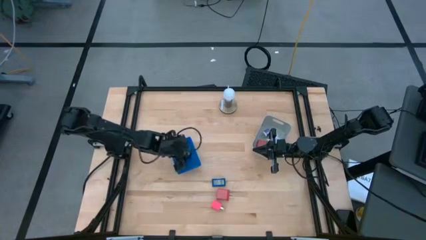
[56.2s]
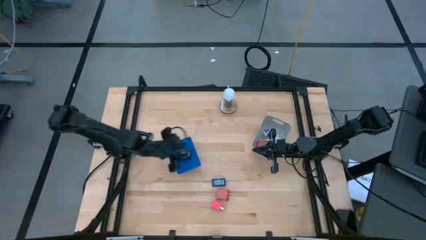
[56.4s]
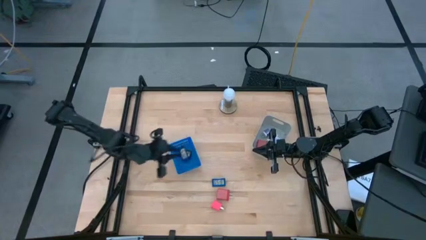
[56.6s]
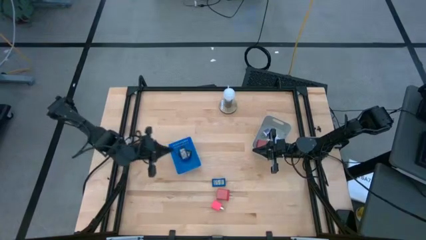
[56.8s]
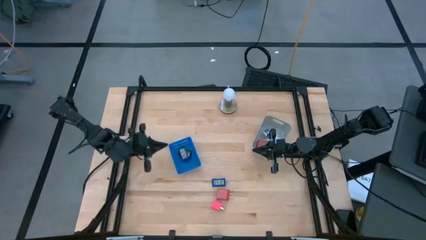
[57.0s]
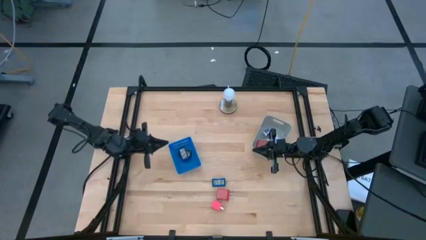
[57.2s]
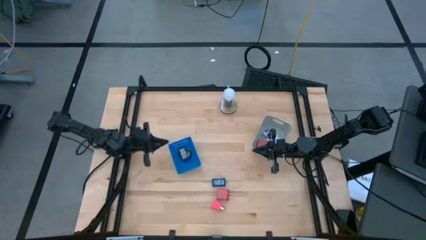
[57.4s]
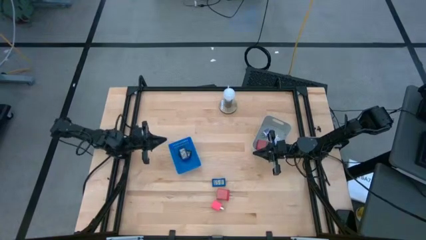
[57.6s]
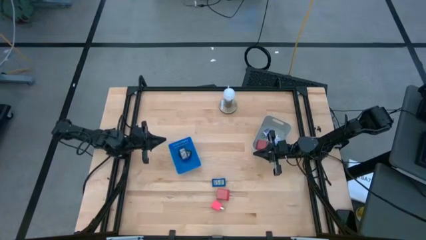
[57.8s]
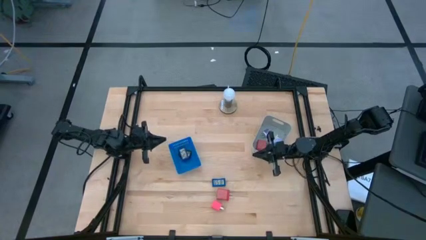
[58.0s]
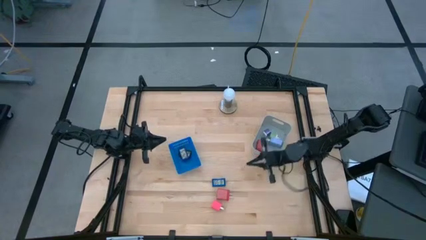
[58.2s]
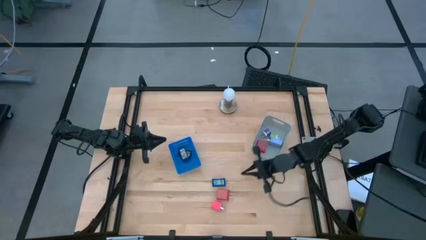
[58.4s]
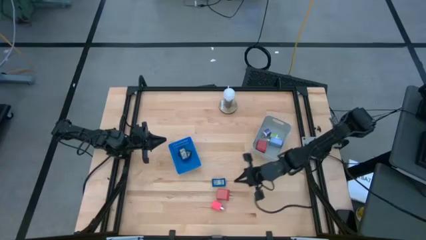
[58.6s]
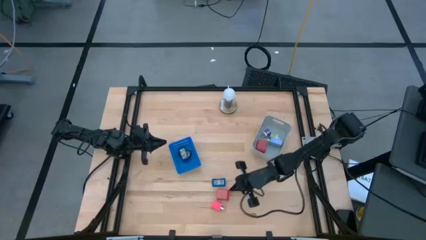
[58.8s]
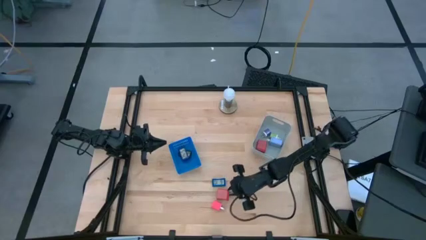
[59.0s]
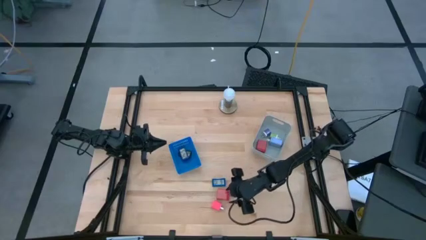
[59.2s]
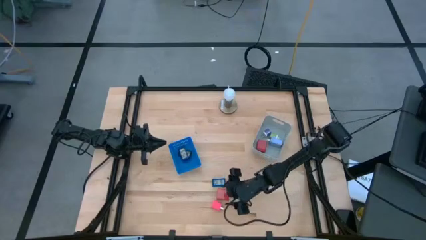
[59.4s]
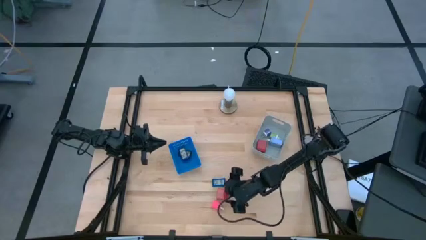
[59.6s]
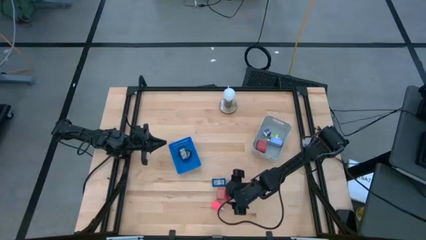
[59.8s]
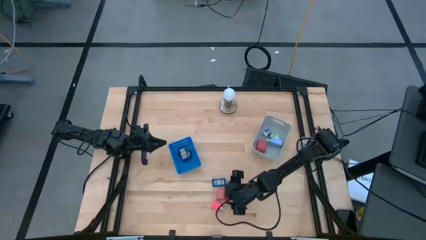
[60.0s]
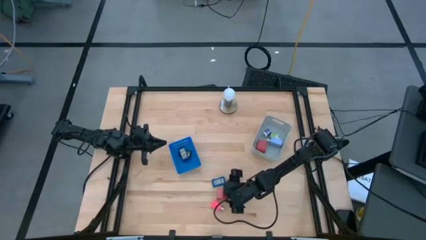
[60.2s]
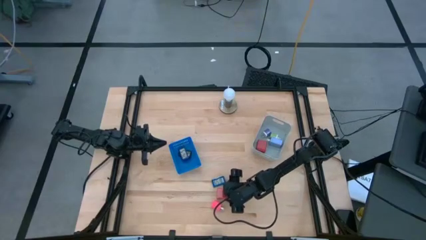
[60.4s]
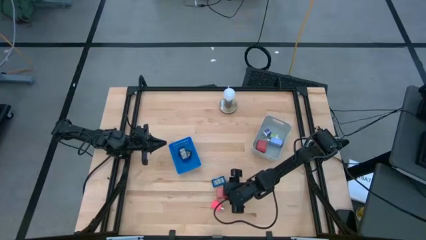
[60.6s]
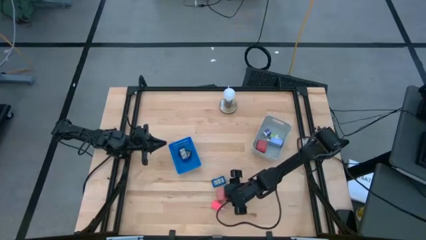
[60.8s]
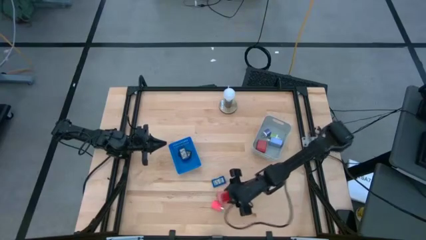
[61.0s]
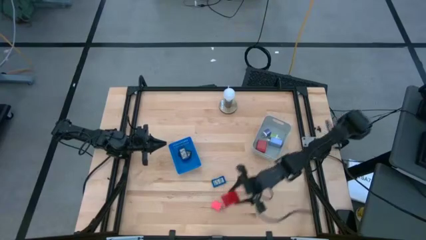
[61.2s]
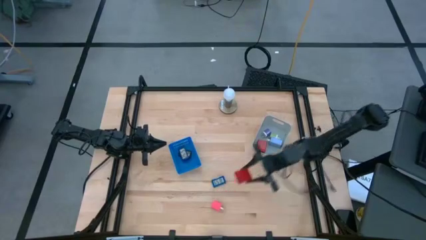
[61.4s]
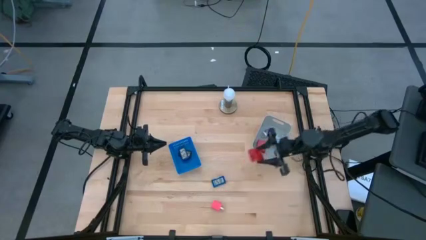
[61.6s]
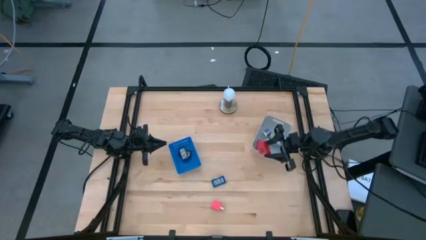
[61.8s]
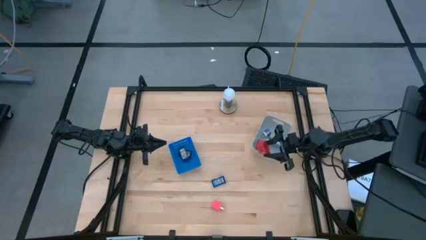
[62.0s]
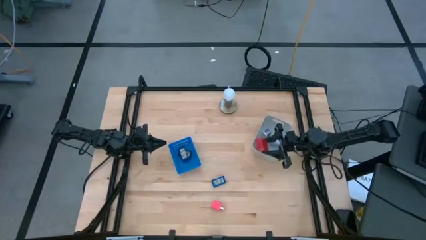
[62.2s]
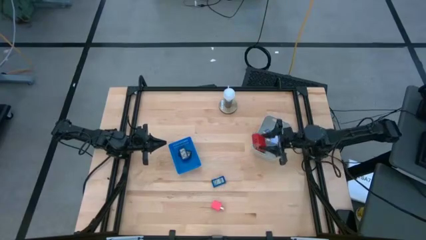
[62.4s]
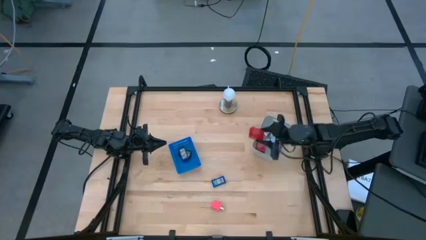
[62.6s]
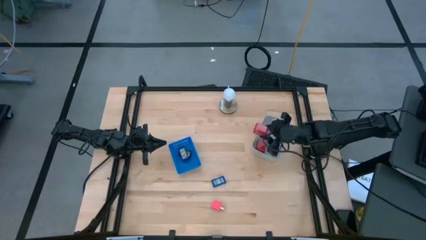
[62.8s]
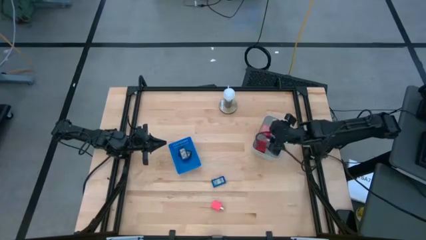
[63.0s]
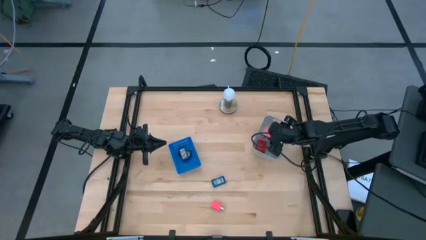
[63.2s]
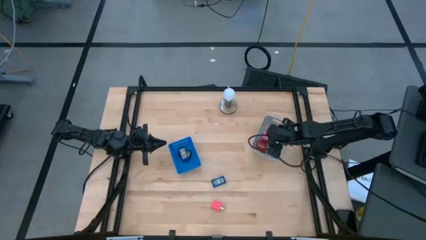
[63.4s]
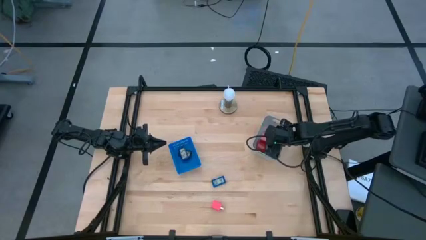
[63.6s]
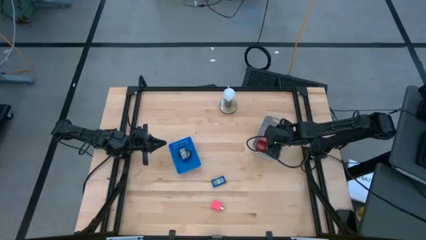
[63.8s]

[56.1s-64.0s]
Task: Pick & Place Office items
Put the red charger adapter into the gray bin

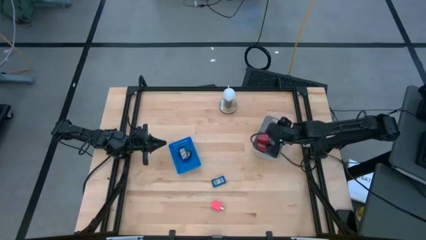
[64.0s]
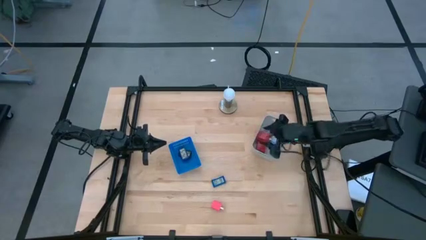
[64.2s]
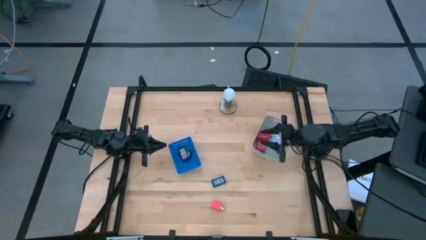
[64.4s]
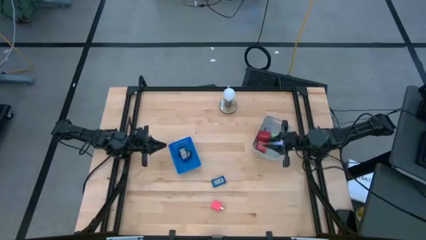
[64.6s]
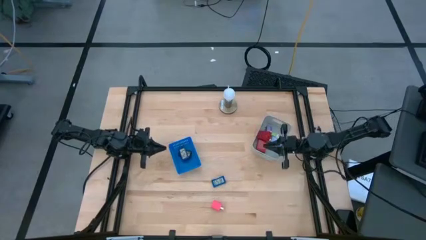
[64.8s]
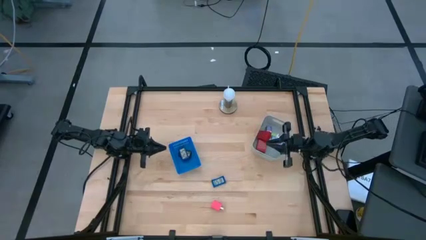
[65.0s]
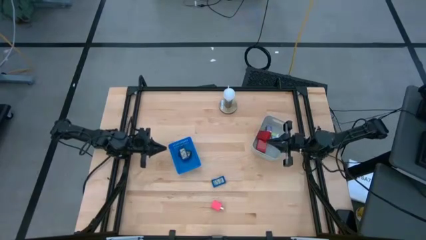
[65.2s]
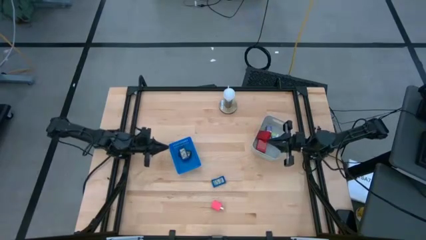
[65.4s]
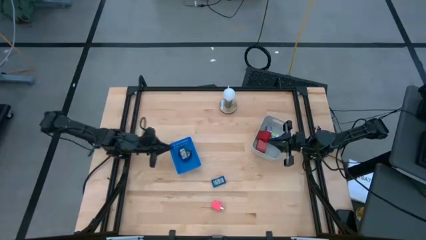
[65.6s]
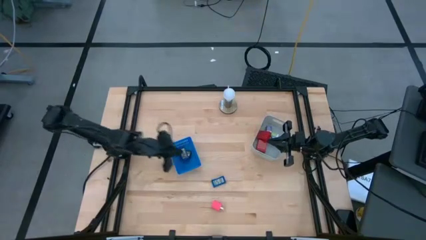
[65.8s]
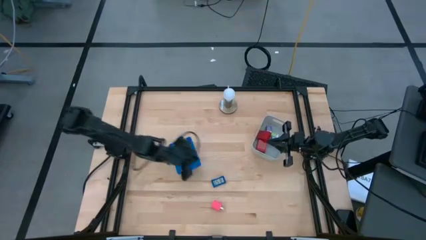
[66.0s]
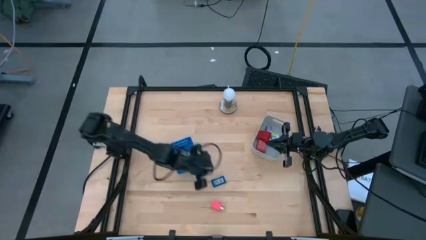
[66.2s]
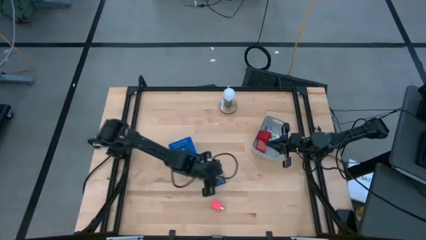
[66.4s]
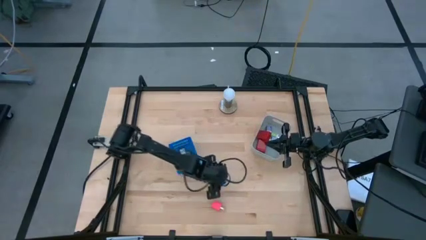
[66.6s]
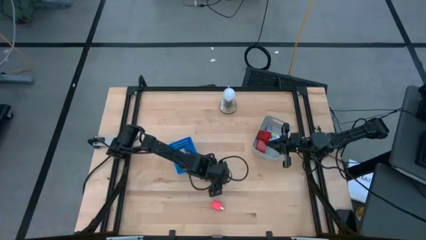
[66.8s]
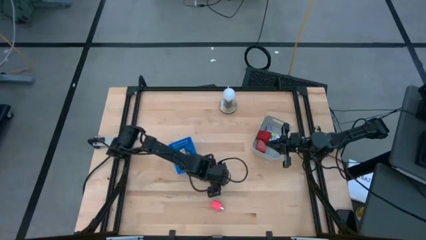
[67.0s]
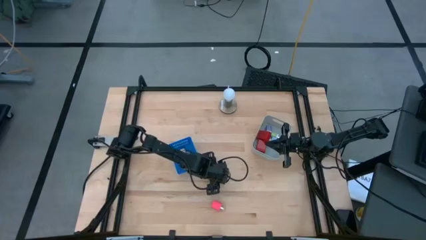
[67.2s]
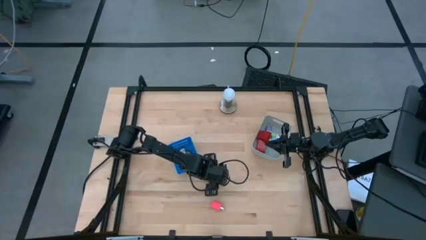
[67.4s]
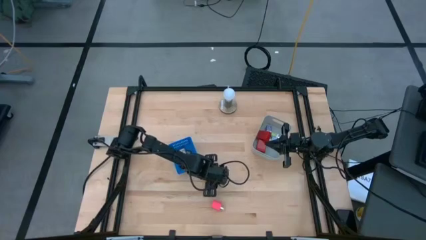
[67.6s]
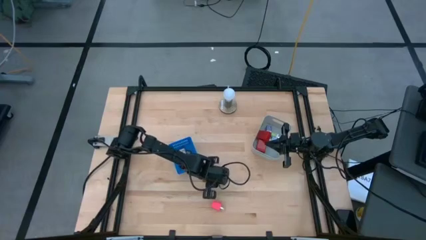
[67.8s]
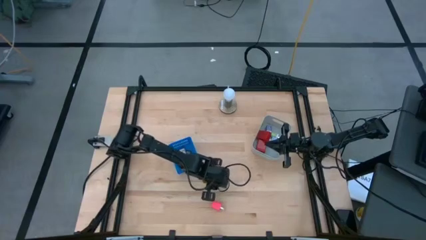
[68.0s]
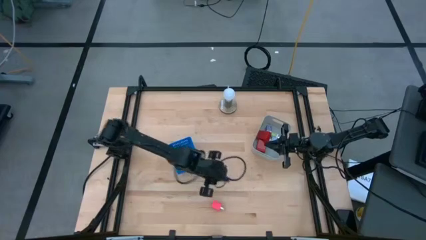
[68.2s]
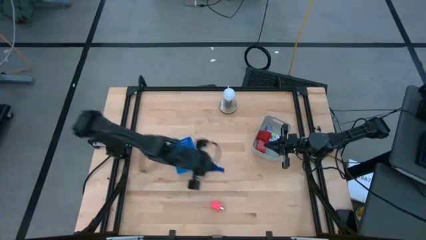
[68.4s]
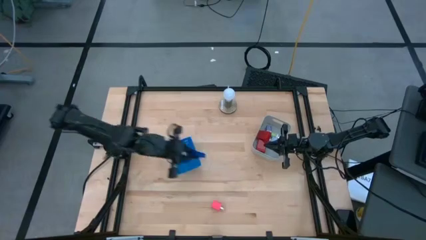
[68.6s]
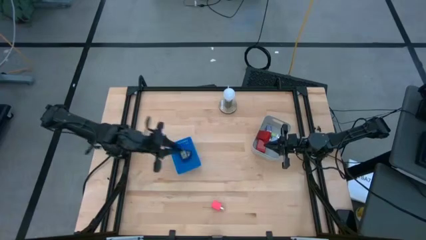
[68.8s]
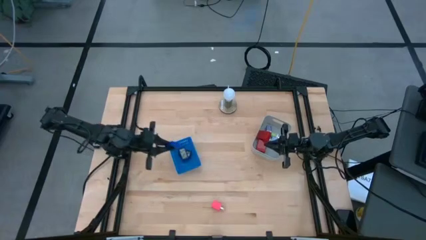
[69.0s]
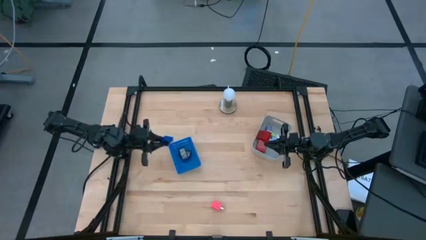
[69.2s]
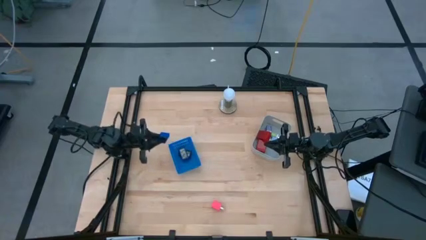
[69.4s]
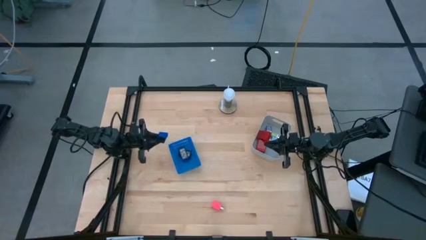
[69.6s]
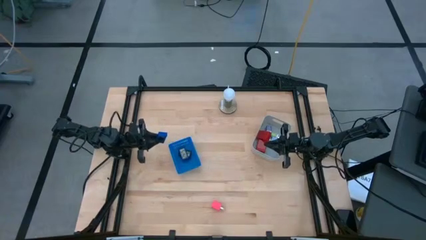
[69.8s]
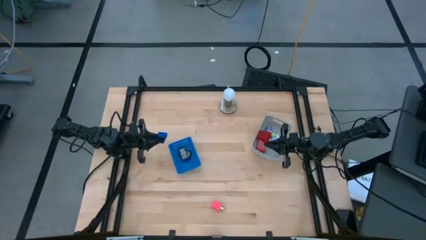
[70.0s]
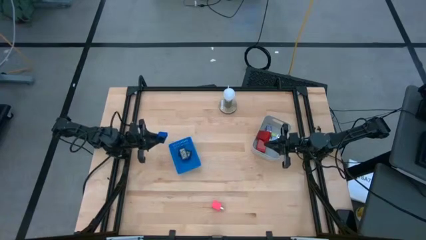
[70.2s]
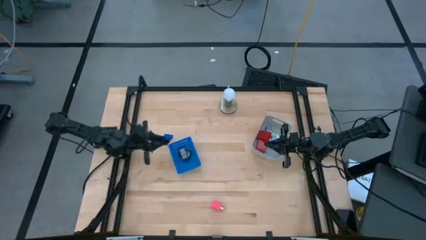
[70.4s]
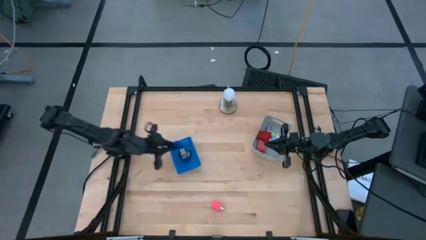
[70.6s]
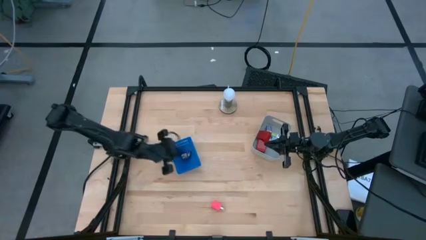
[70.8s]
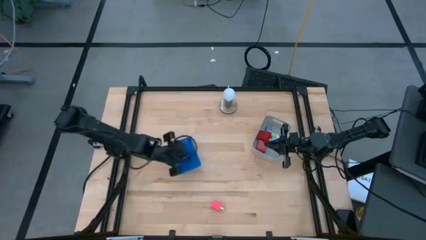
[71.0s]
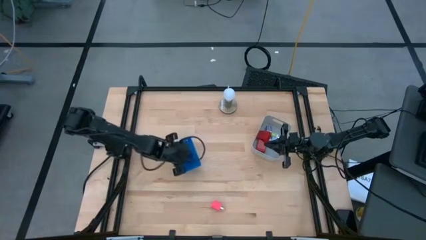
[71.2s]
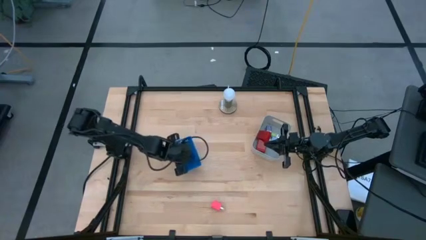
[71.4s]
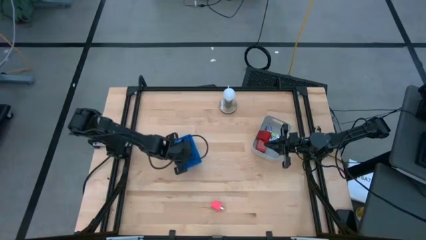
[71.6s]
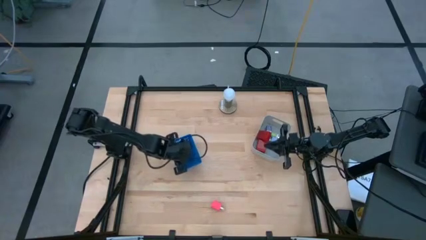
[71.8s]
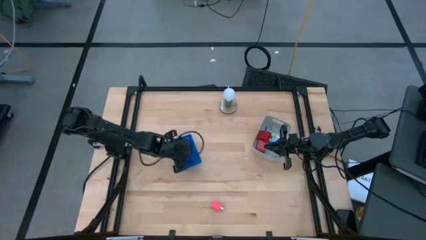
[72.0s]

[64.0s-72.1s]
Put the light blue digital timer into the blue bin
